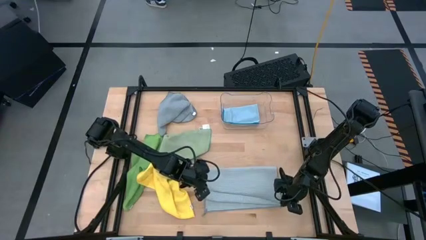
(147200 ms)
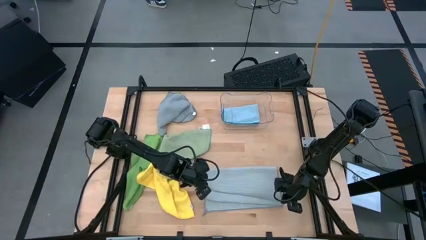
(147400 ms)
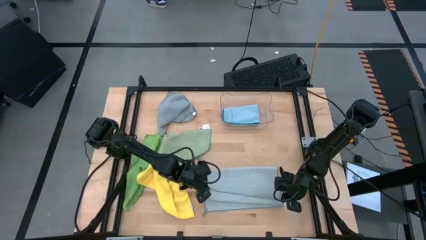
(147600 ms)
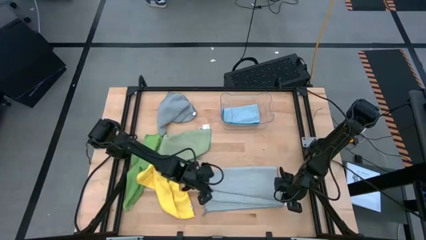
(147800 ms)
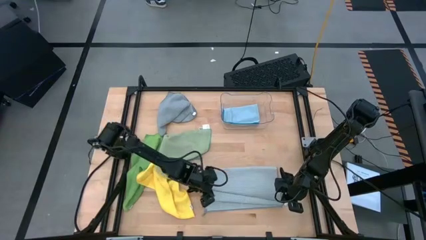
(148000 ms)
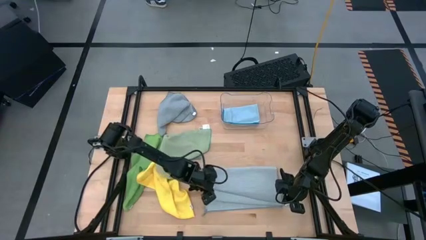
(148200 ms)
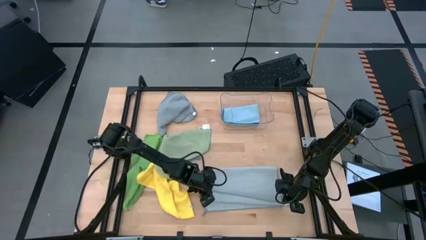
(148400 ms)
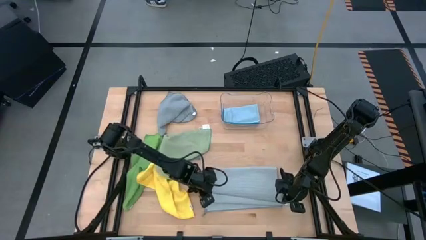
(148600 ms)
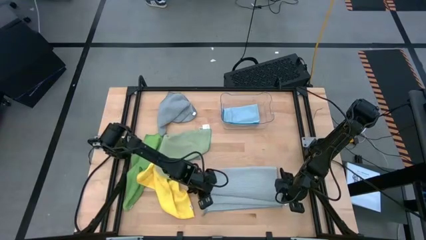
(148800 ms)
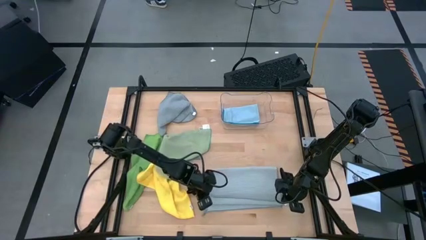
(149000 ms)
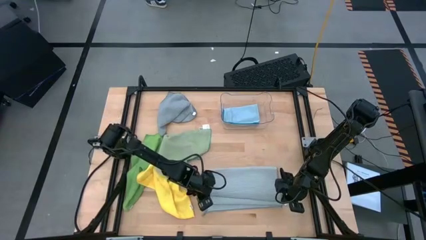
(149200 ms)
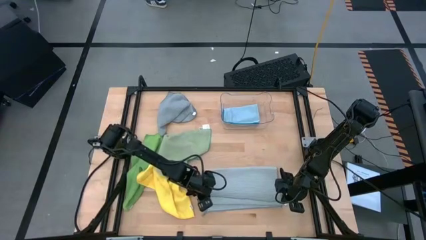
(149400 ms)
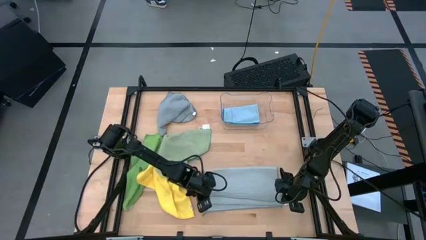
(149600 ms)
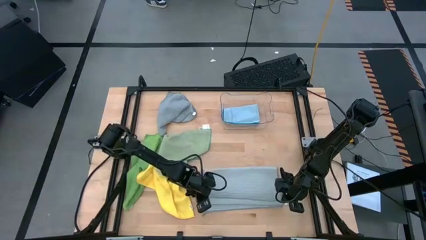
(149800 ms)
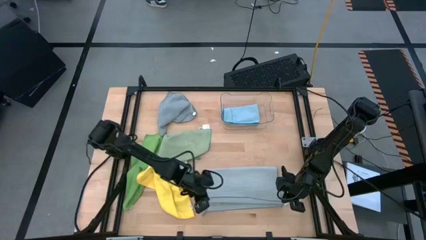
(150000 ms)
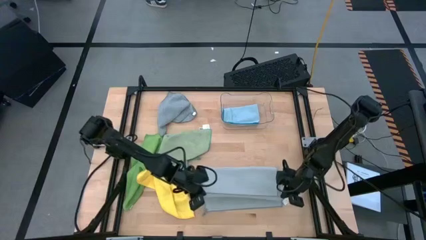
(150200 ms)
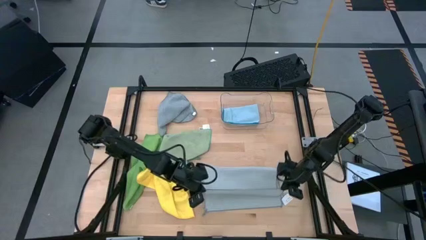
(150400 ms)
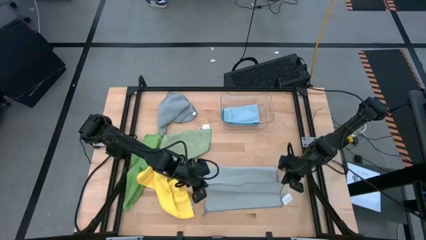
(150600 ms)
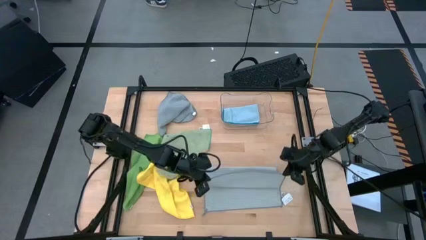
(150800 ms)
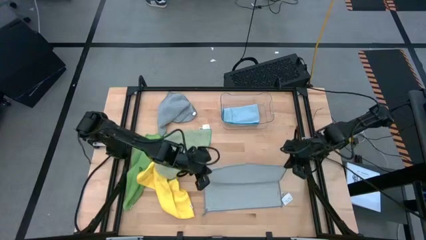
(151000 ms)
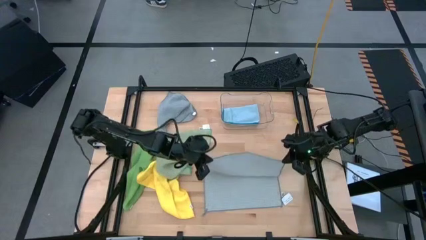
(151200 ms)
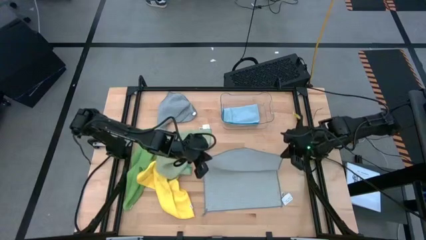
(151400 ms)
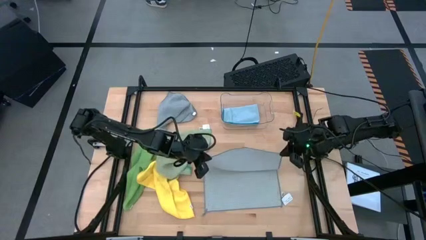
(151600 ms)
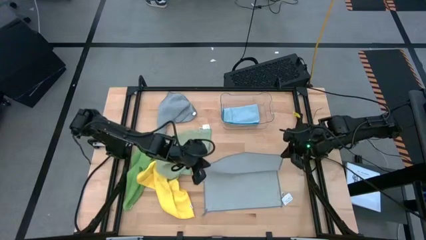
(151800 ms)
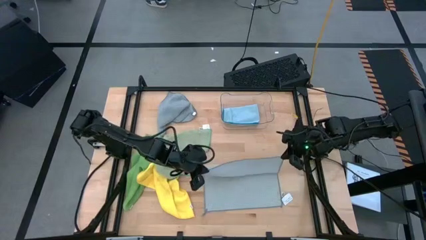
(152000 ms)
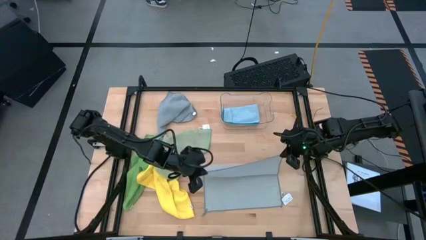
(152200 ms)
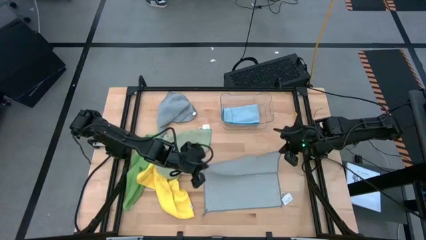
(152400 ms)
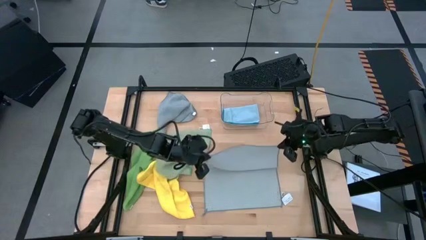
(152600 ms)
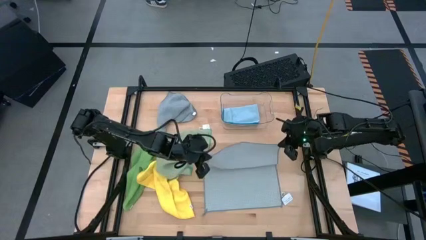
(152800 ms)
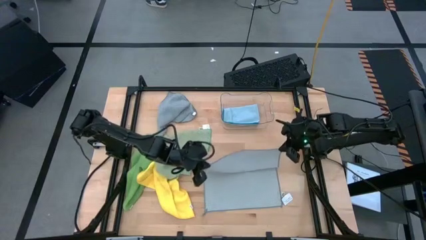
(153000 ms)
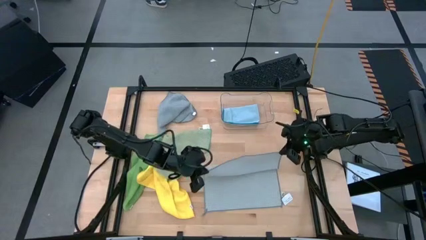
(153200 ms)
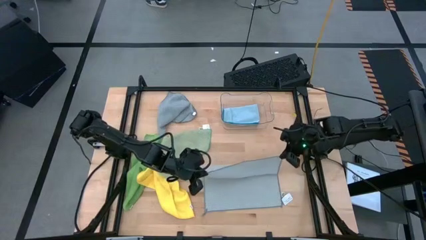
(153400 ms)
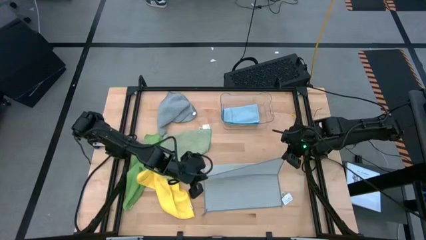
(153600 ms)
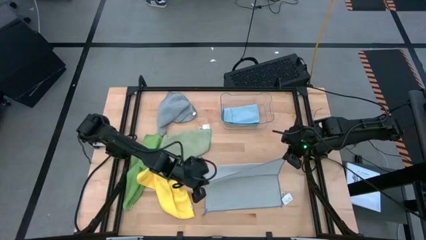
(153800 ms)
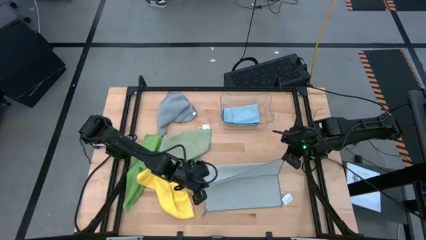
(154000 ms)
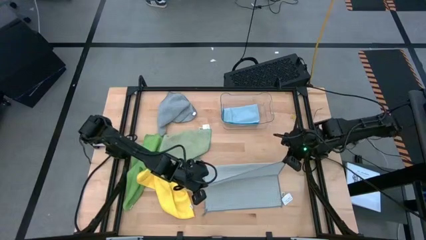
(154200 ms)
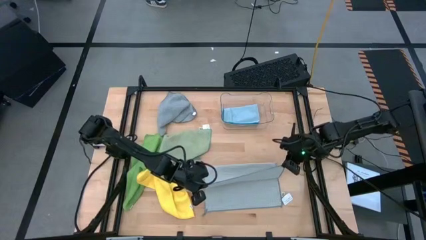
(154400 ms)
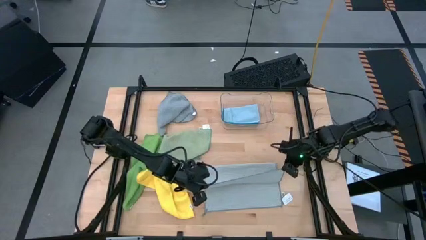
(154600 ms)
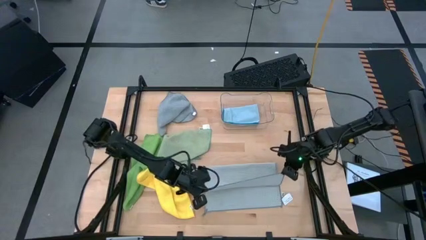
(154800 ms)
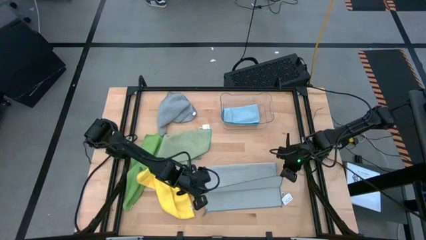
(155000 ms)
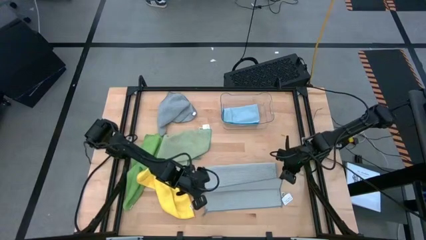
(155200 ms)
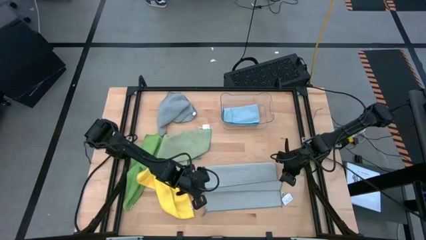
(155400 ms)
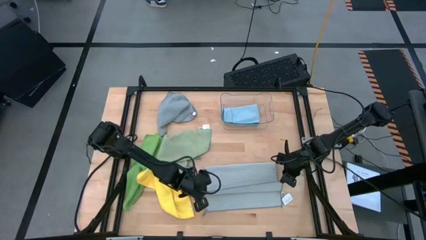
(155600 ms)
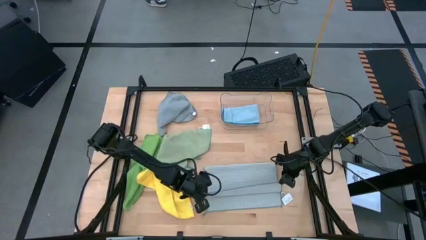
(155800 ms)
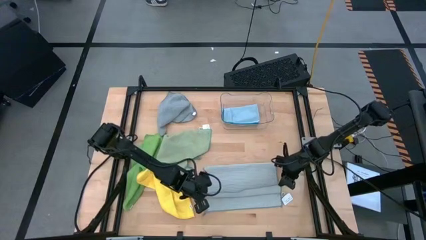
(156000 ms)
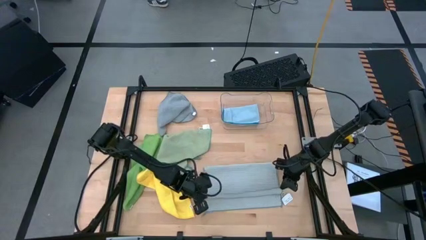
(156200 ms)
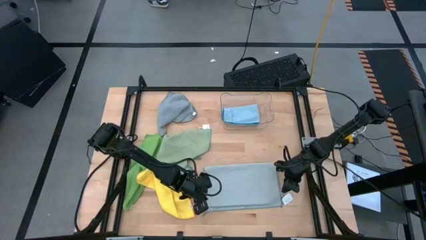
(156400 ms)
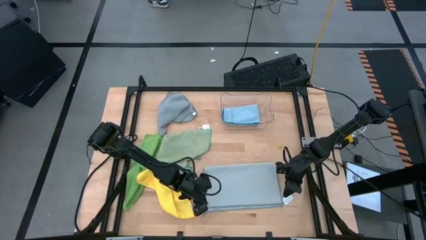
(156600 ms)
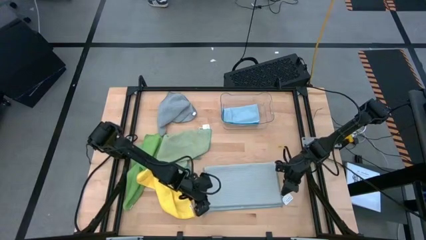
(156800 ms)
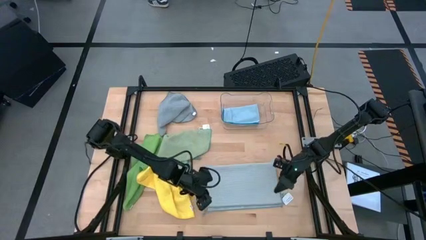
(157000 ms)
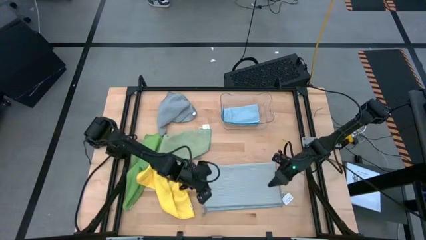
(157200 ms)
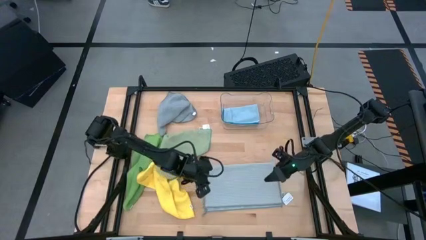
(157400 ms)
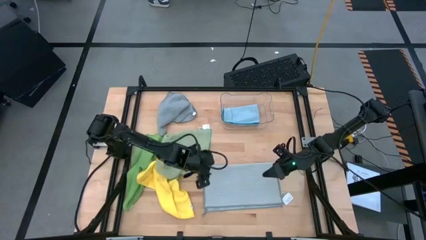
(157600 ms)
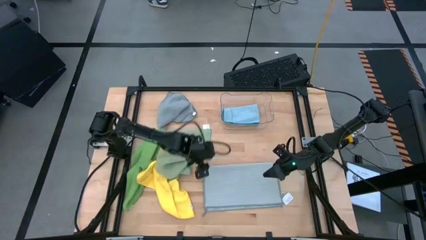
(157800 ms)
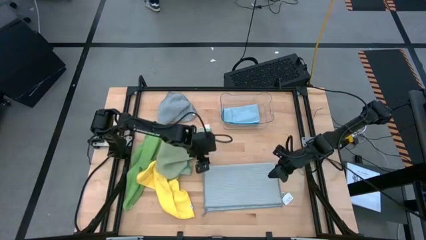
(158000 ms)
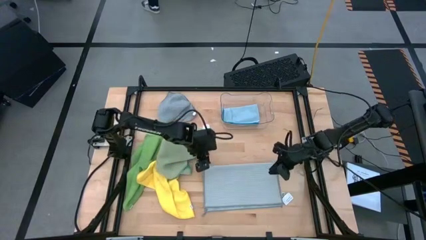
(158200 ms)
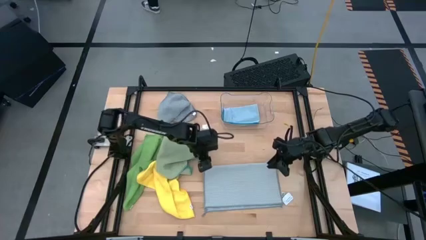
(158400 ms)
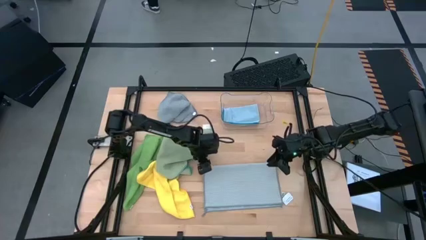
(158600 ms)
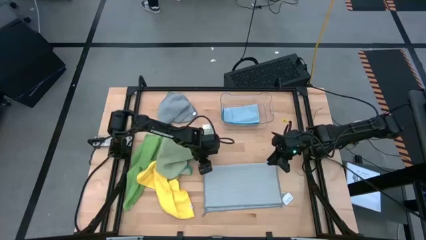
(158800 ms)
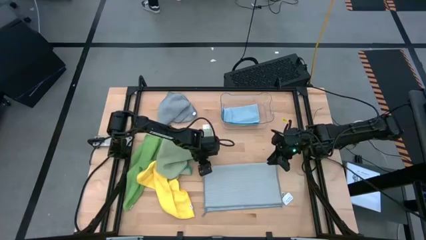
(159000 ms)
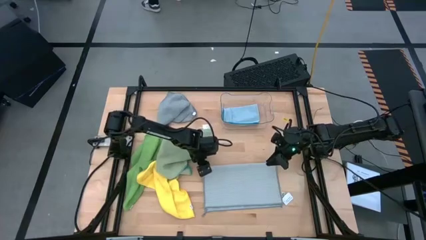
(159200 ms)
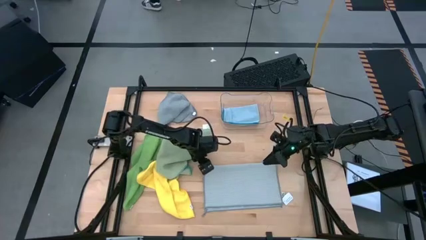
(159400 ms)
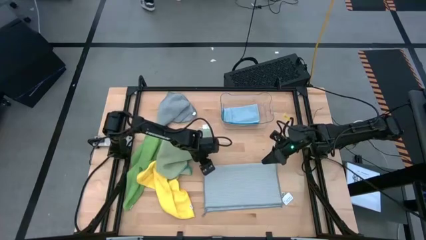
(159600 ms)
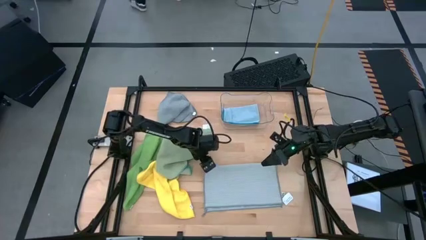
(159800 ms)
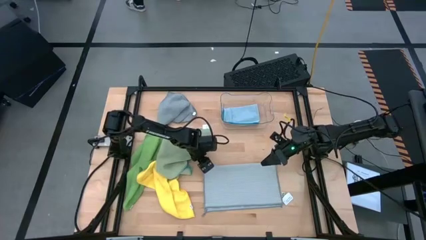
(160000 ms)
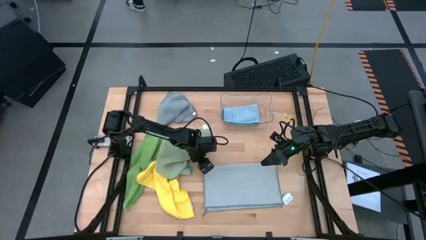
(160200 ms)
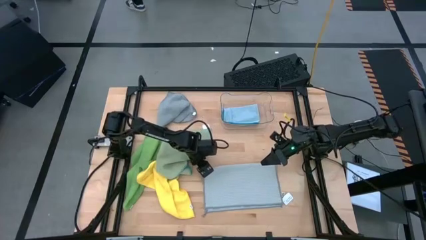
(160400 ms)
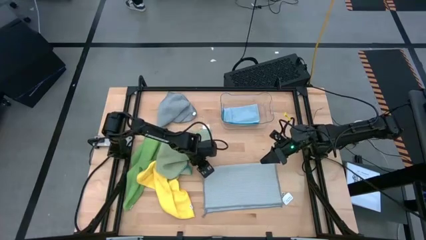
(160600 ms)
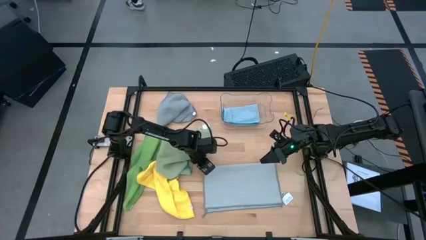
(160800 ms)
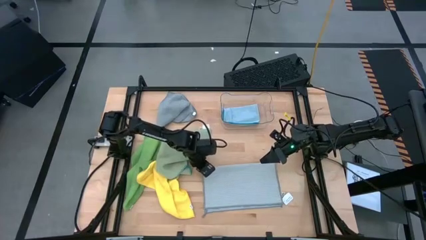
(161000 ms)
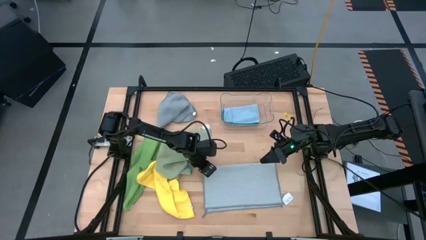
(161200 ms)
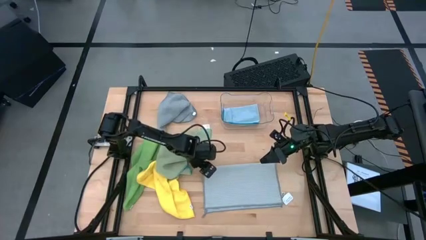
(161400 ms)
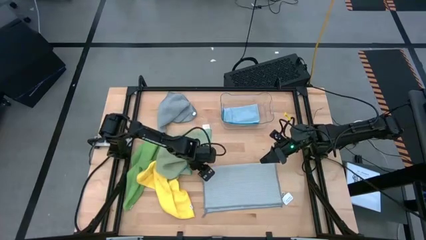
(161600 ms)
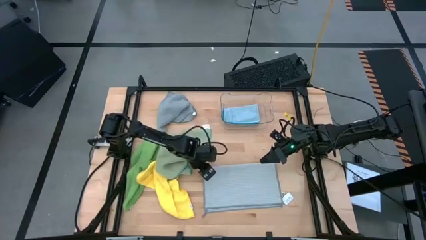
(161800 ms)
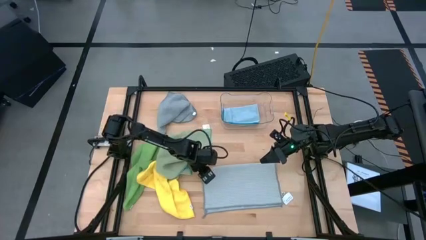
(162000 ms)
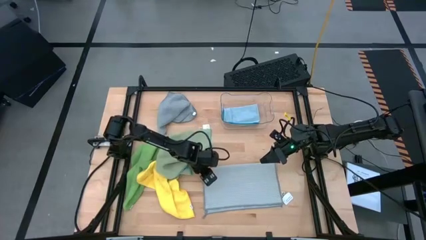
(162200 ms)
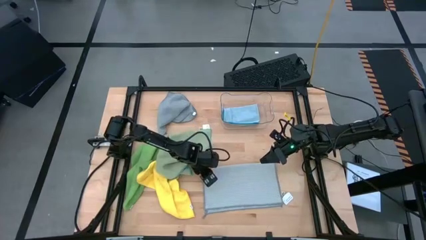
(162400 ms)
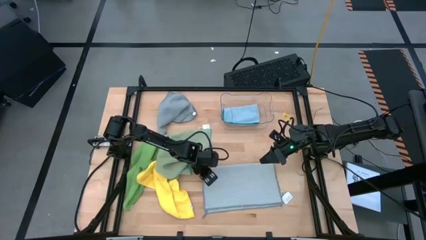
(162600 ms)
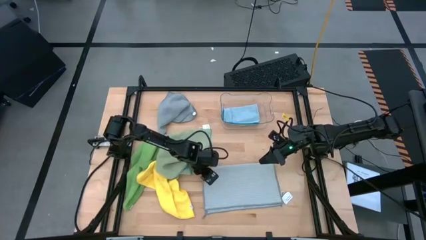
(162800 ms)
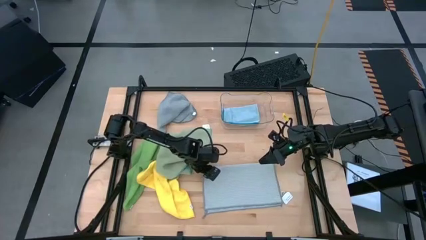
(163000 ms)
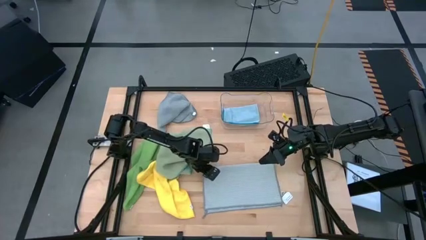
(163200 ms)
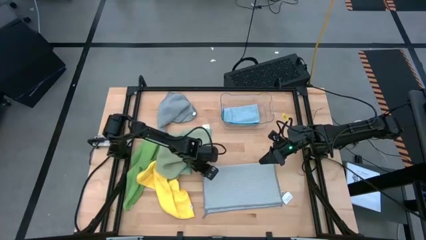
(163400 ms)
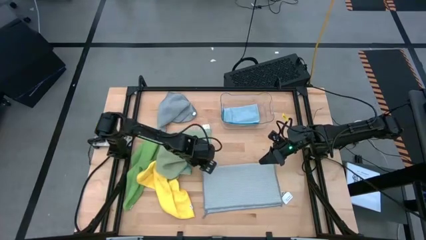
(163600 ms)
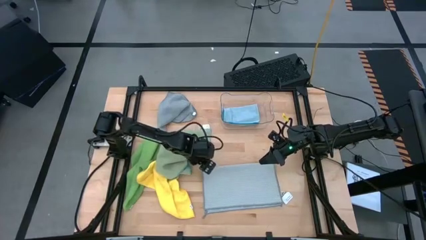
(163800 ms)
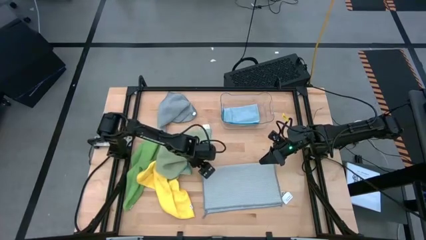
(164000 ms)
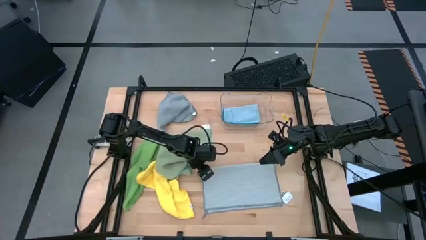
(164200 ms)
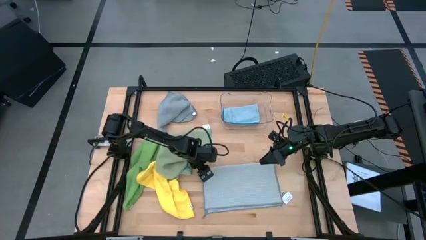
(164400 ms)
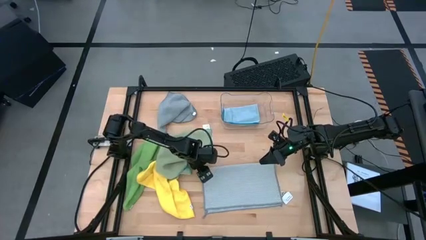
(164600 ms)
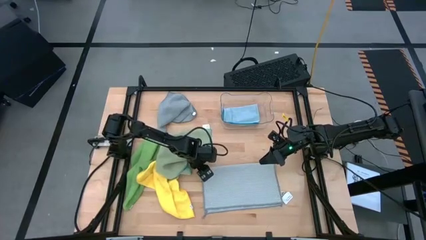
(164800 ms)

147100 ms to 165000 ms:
Task: Fold microfiber towels
Fold the light gray towel
